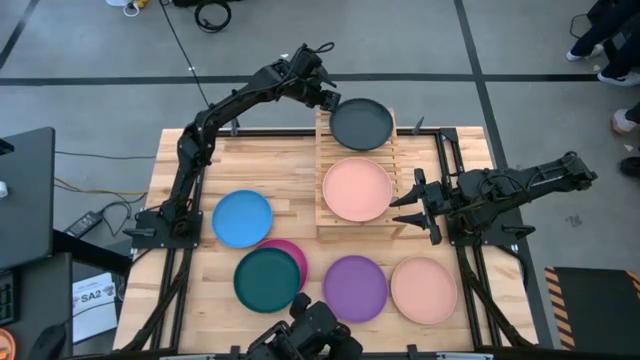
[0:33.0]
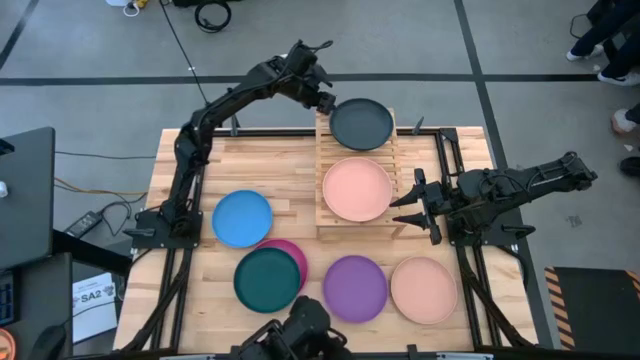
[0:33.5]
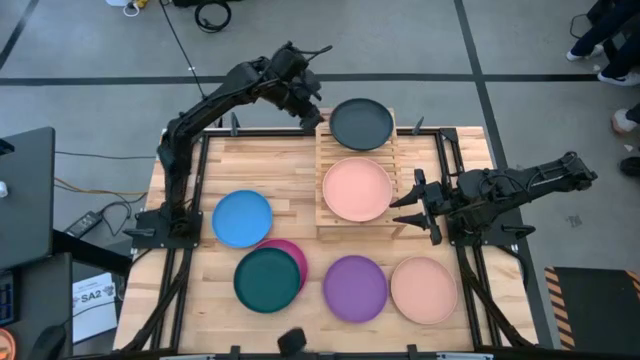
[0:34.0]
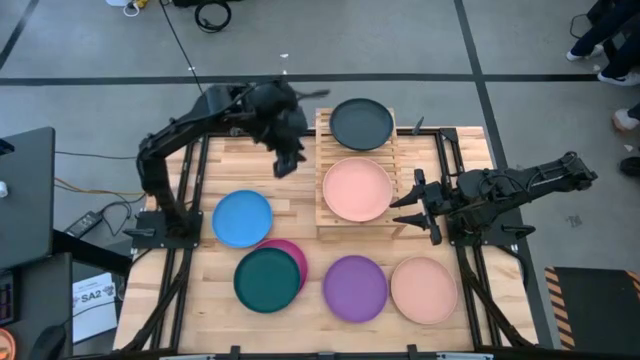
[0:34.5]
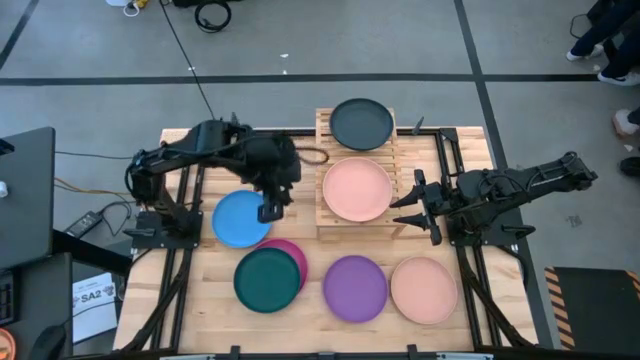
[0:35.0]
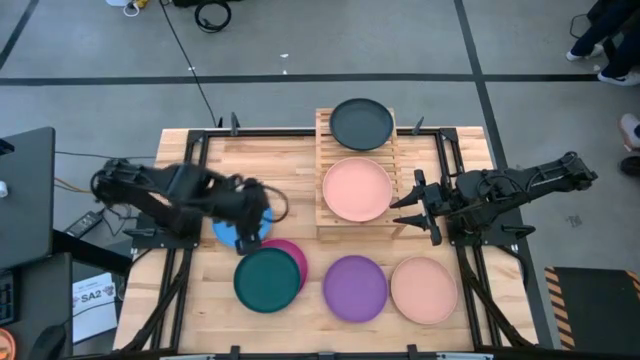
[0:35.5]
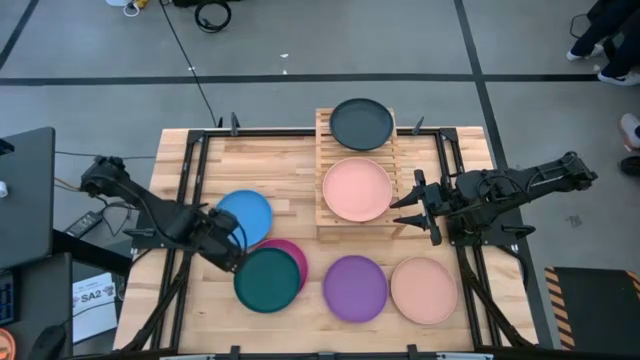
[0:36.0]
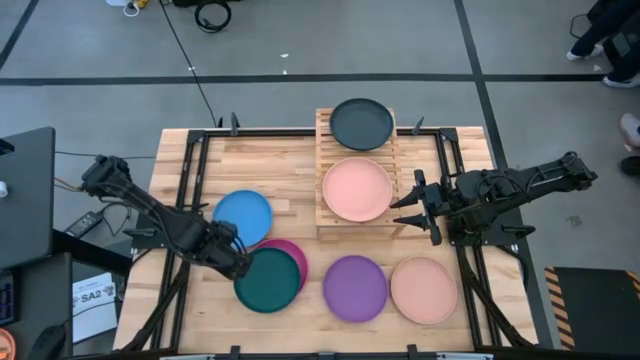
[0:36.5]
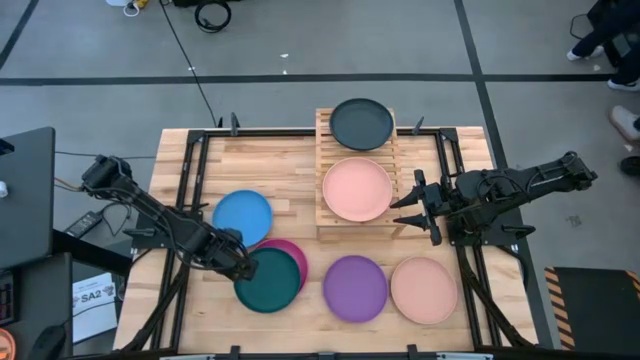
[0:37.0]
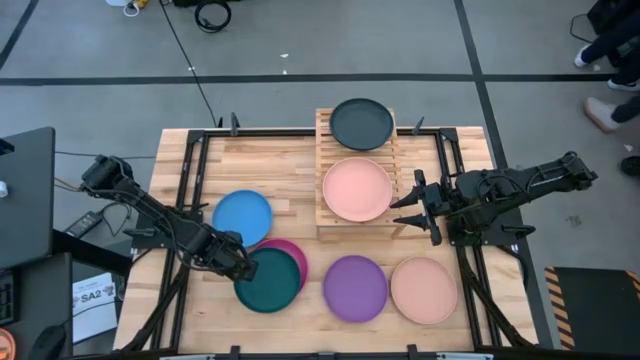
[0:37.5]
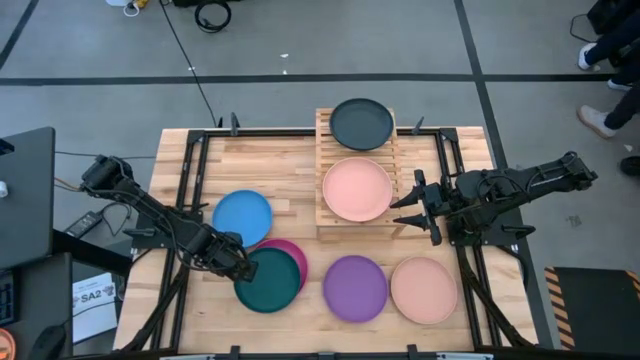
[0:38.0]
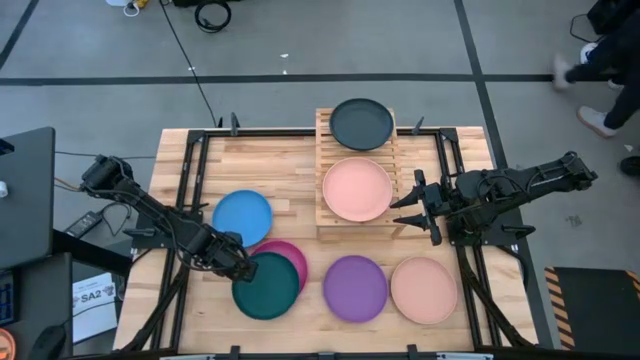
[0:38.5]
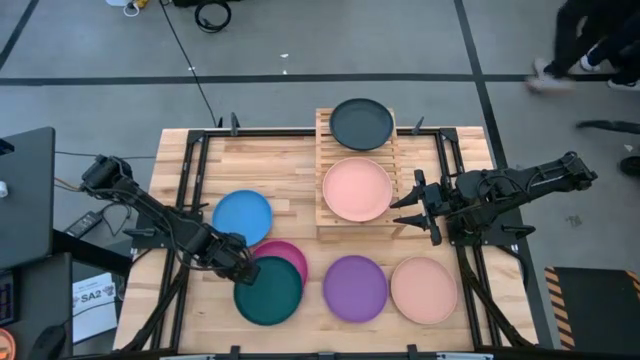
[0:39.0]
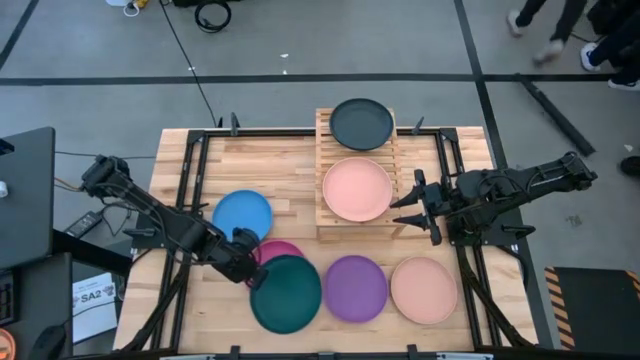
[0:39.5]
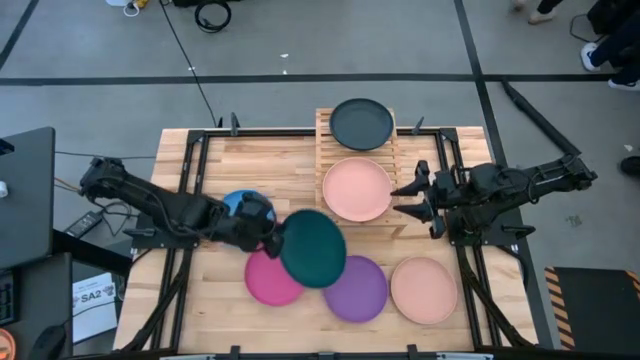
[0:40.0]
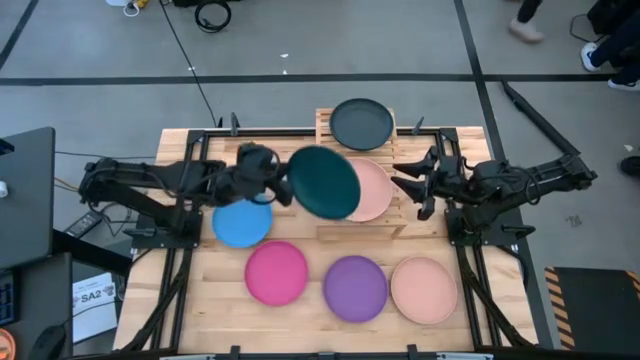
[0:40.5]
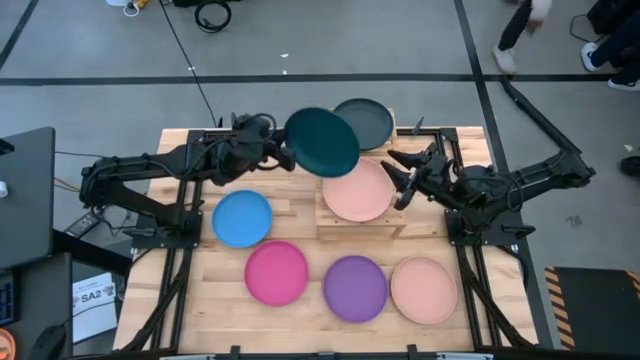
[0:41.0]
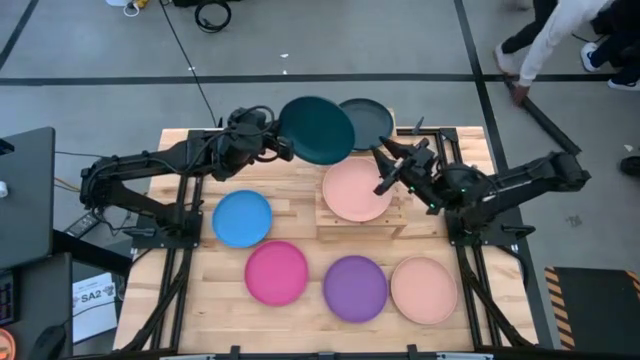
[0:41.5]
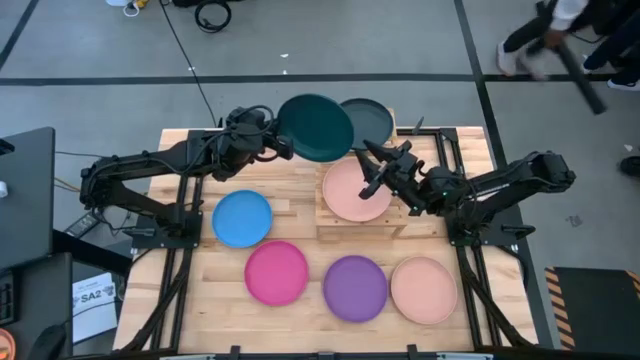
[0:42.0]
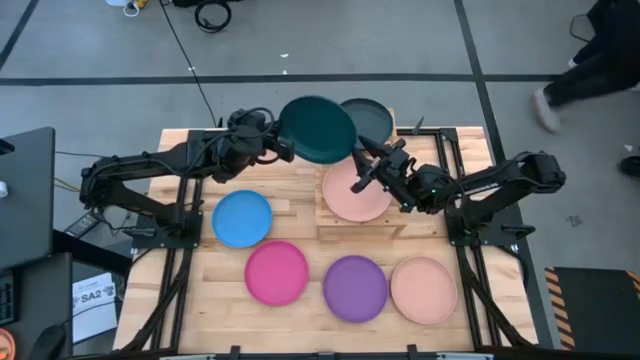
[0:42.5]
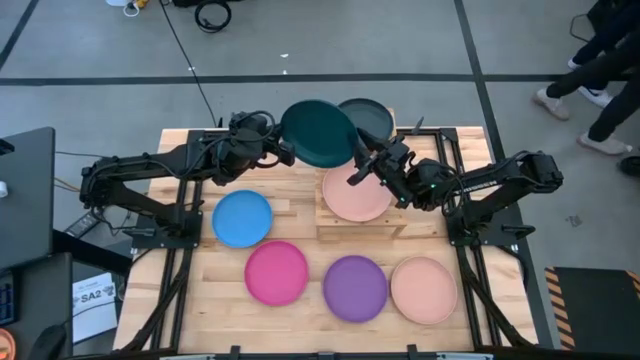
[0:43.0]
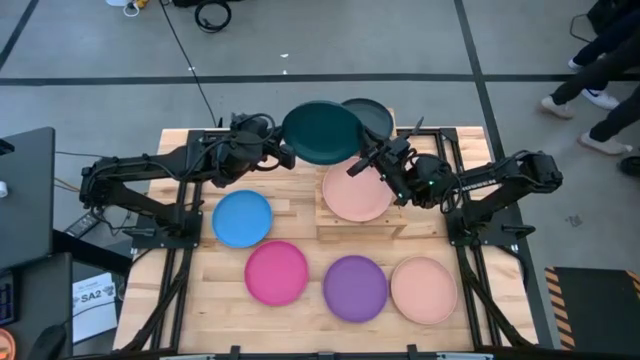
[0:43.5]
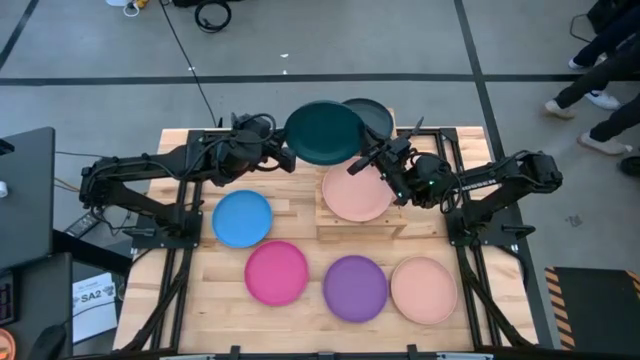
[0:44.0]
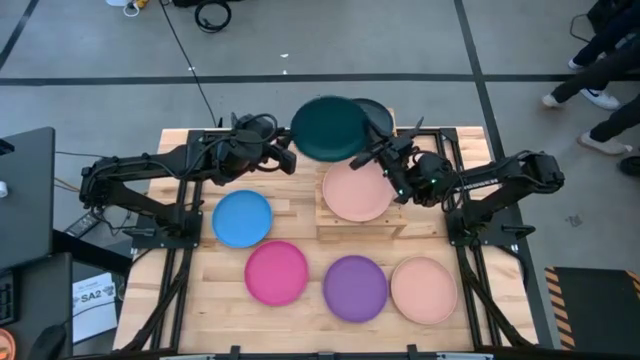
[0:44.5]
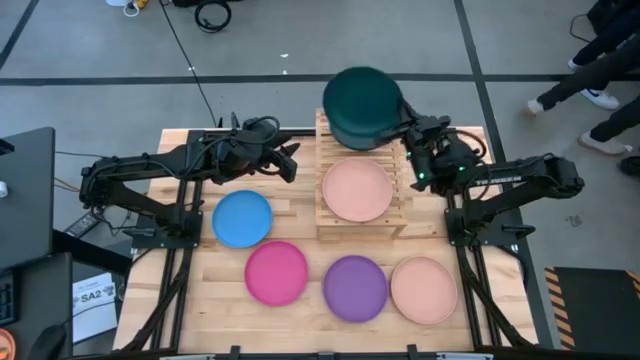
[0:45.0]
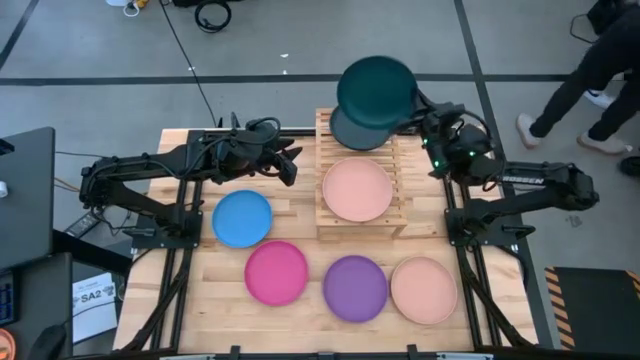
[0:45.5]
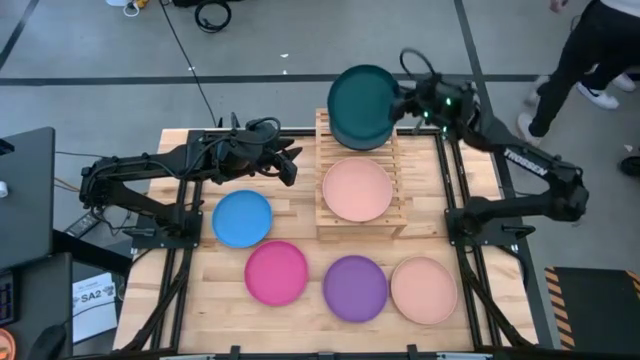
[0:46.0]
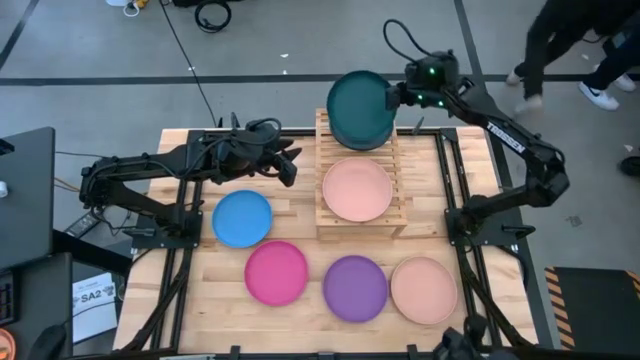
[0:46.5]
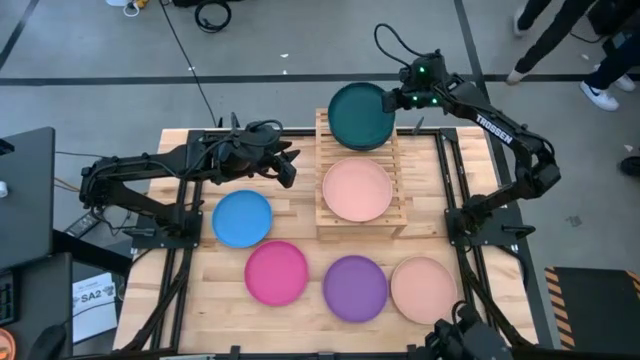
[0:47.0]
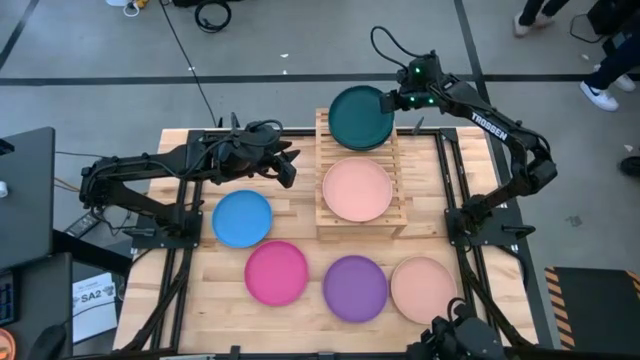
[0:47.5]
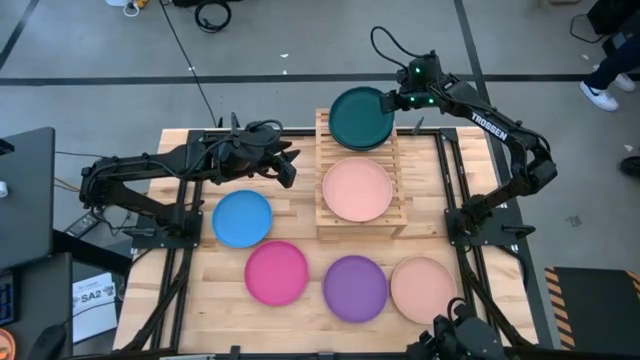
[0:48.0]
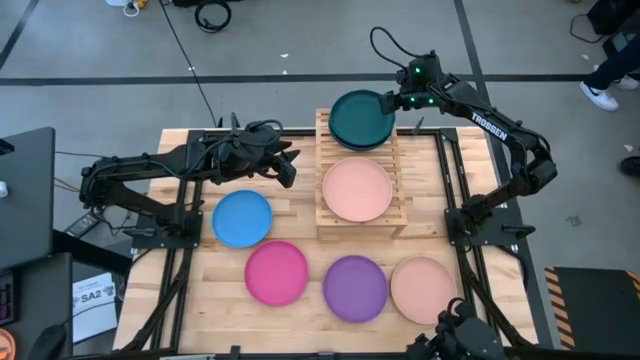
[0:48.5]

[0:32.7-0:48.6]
Task: Place and stack plates onto a shelf
Stack the dark green plate on top of the black plate

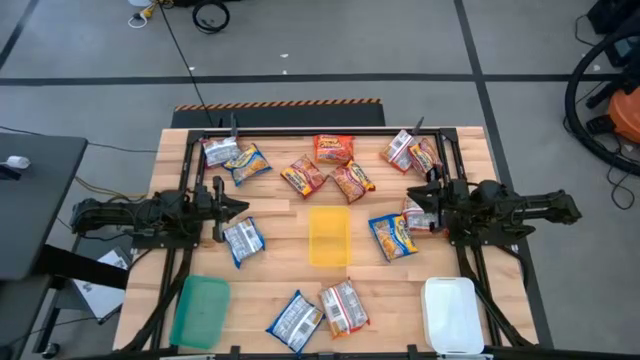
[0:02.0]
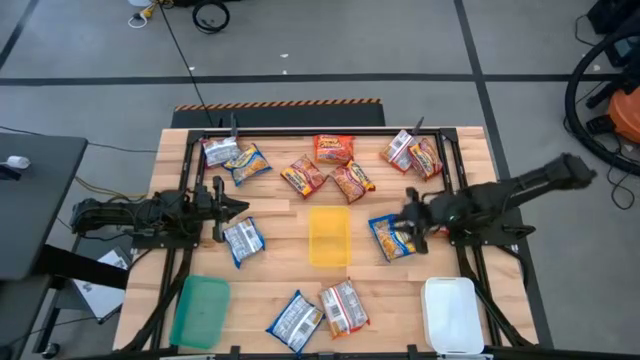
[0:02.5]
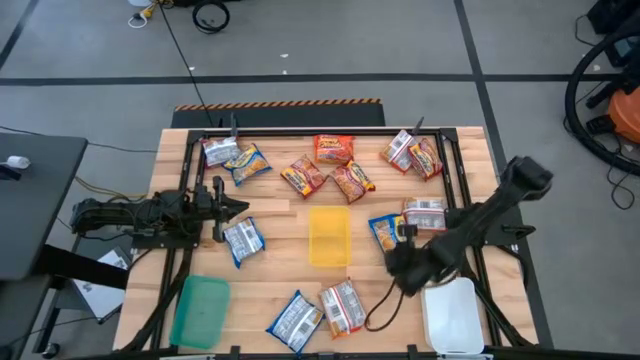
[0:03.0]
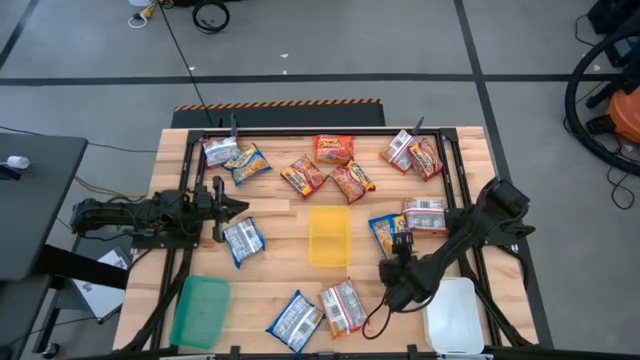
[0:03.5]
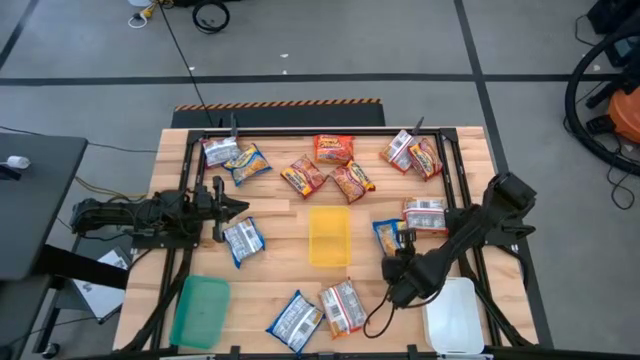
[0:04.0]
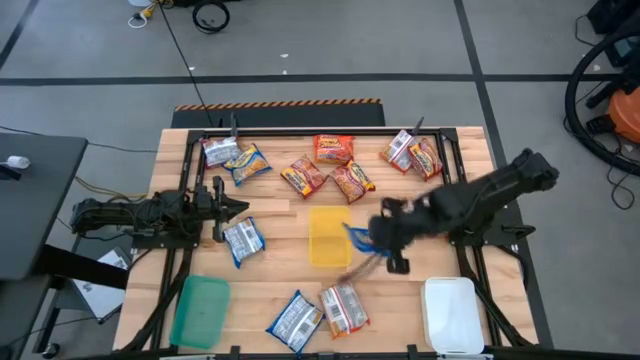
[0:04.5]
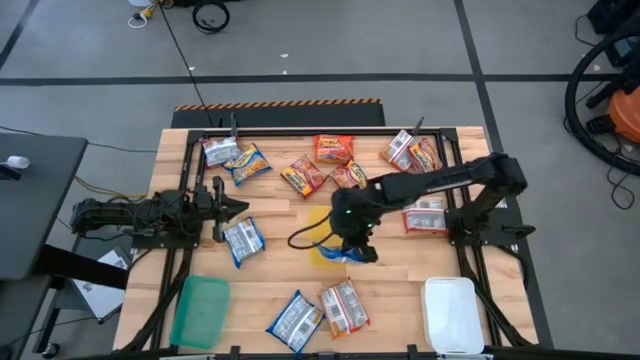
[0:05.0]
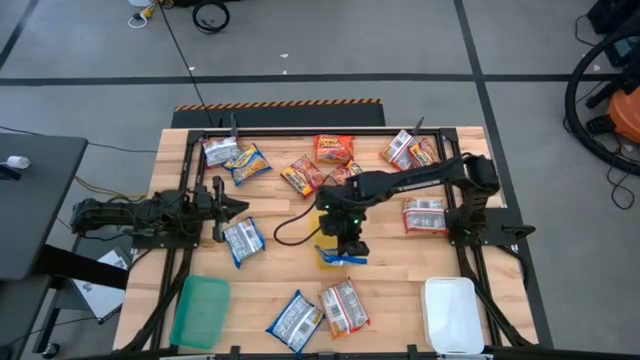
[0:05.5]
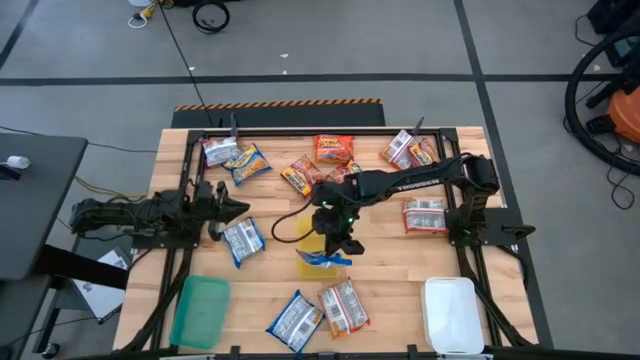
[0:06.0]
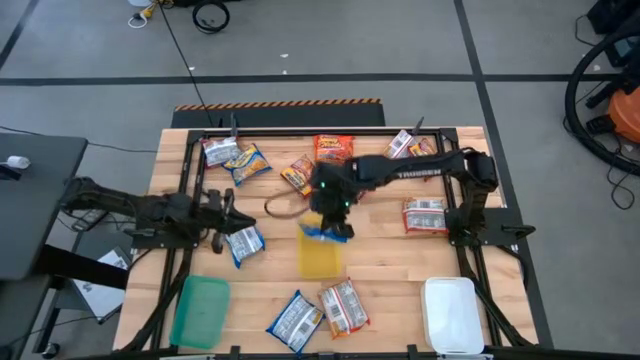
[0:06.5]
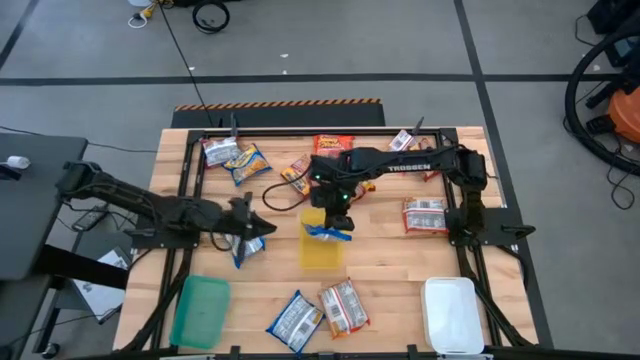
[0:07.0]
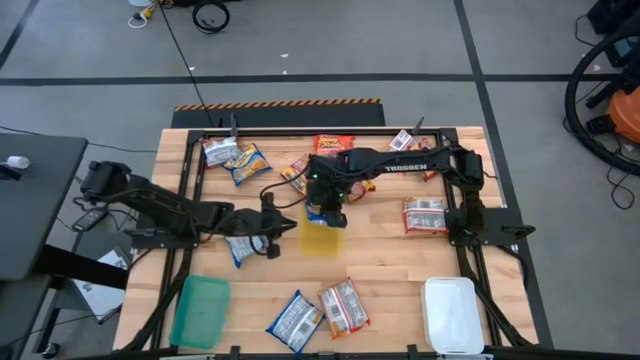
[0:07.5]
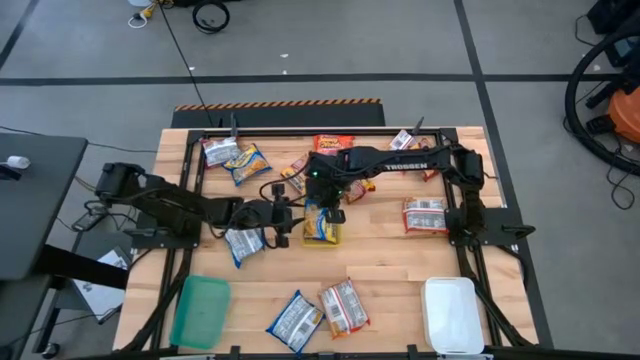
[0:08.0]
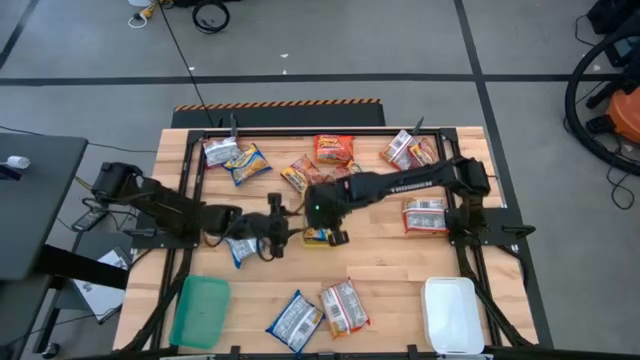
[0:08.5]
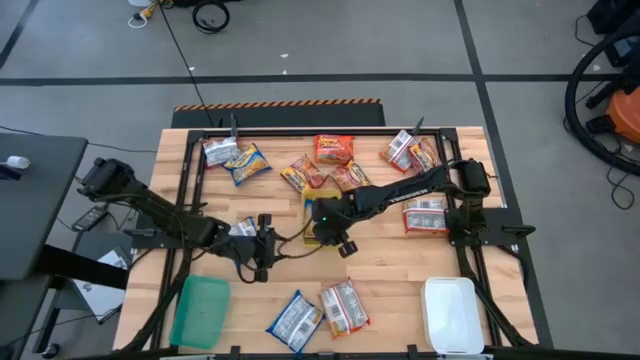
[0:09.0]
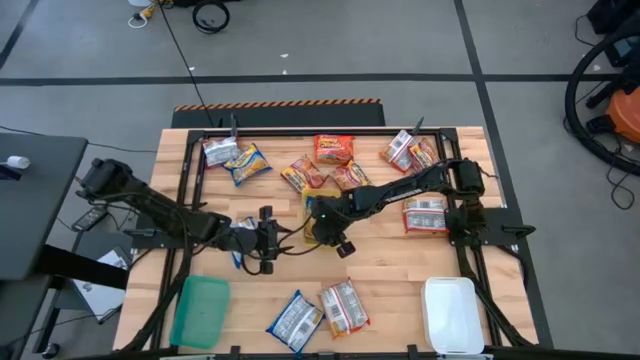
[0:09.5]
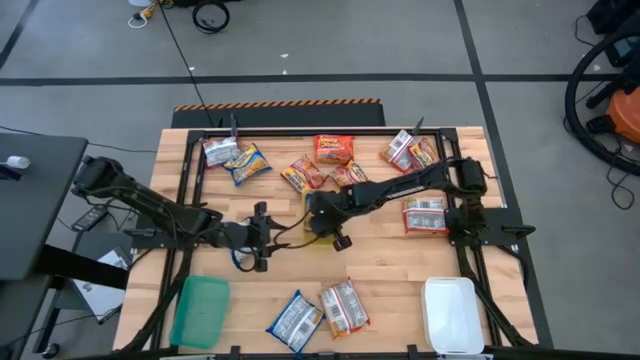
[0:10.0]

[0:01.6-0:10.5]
Task: Sort Maruchan noodles
Put the blue noodle pack into the yellow bin
